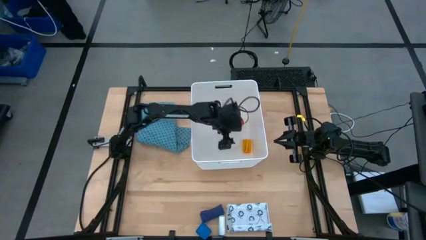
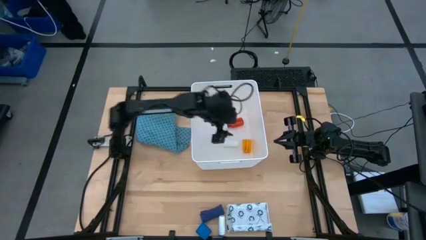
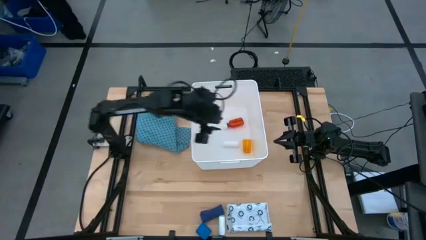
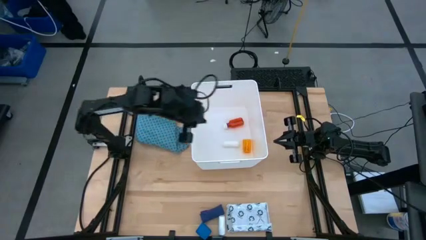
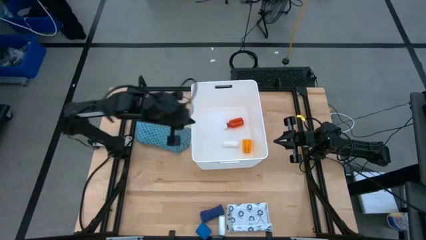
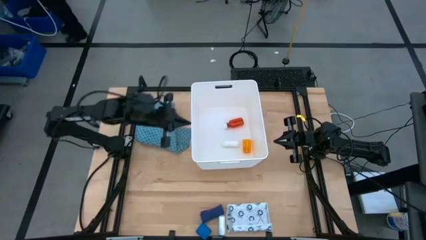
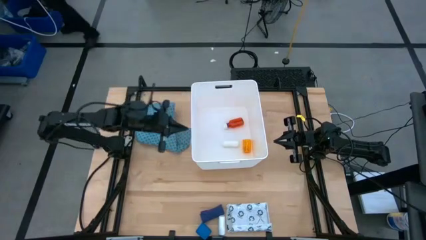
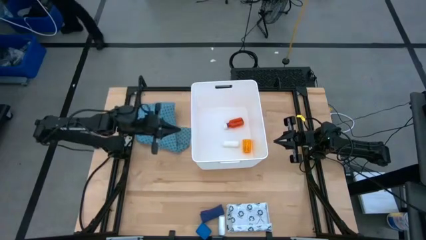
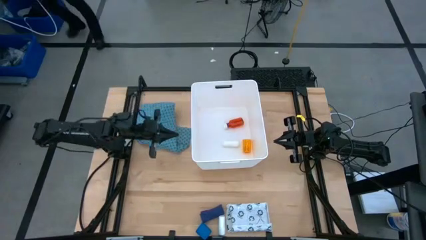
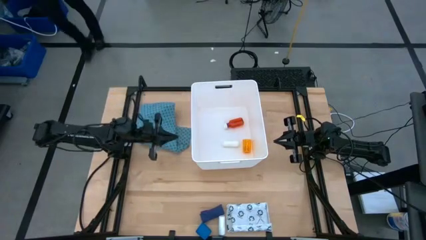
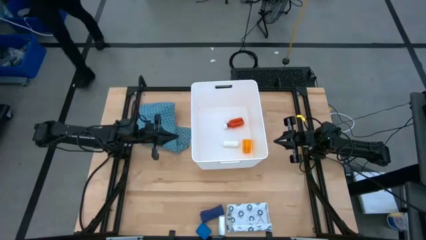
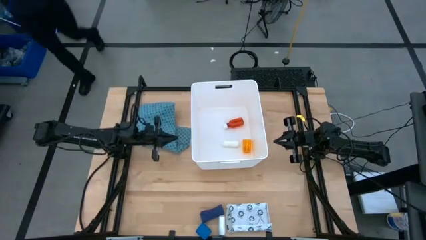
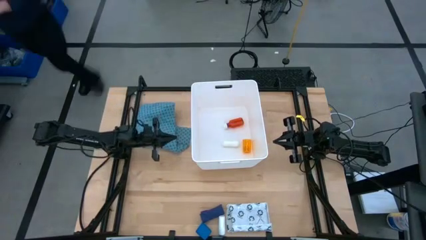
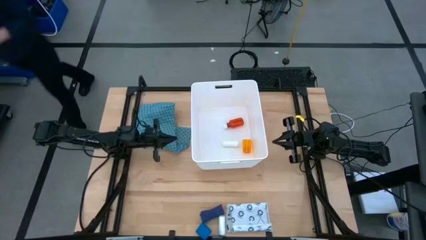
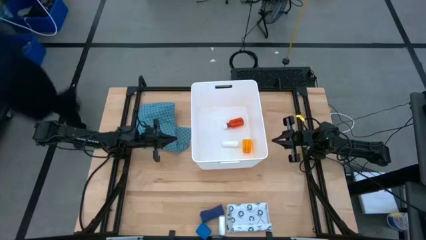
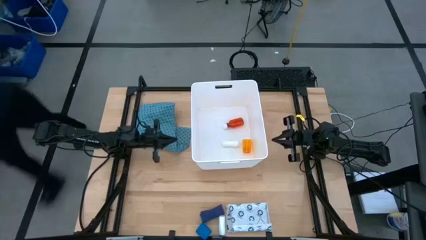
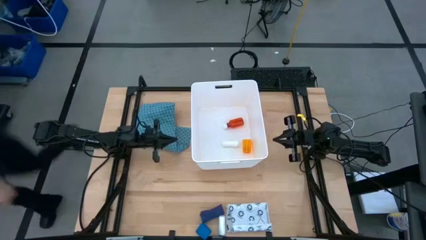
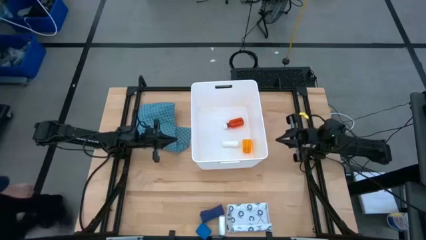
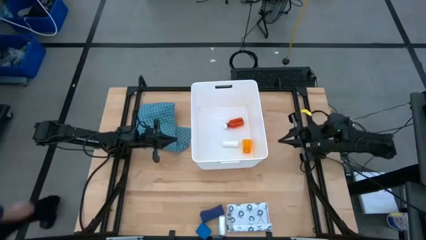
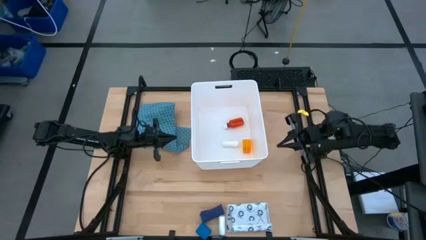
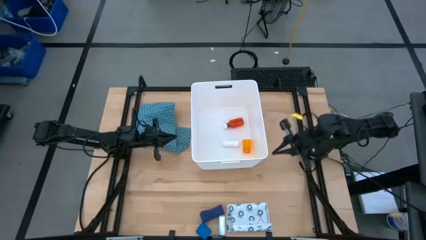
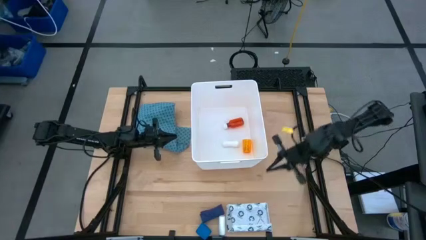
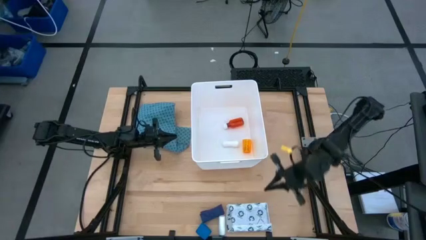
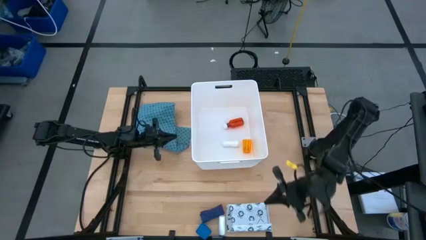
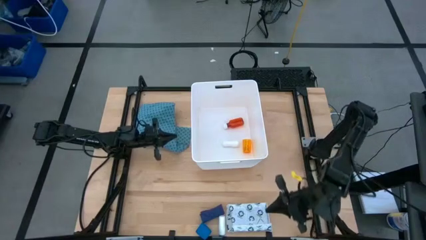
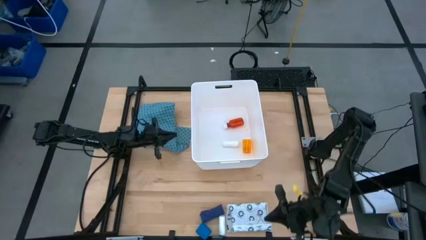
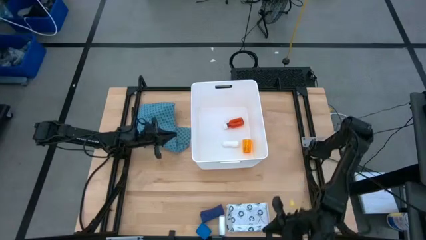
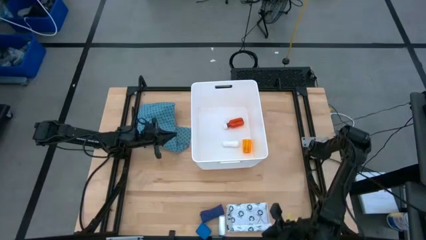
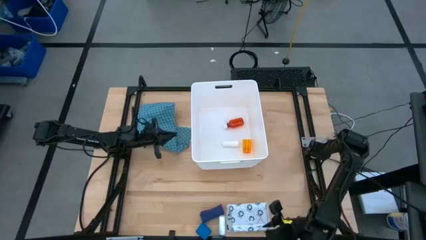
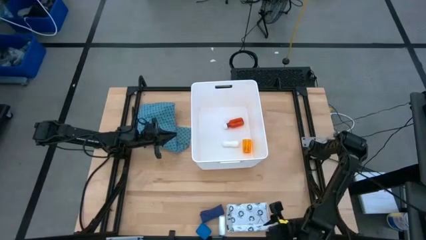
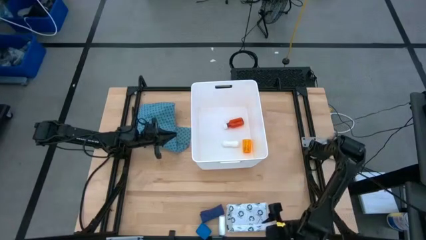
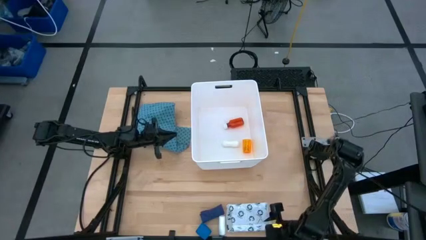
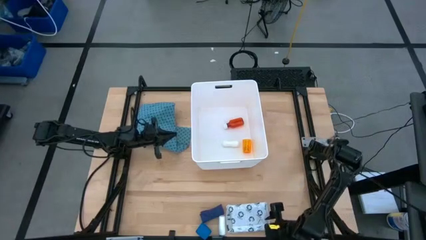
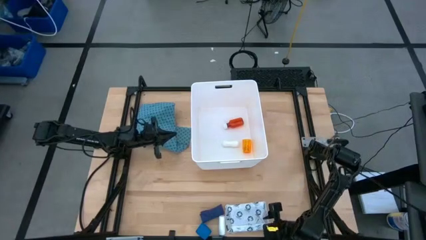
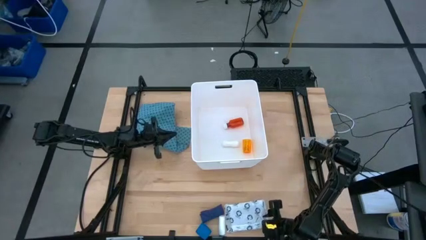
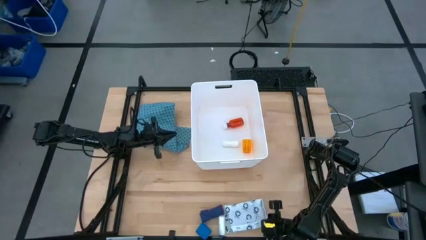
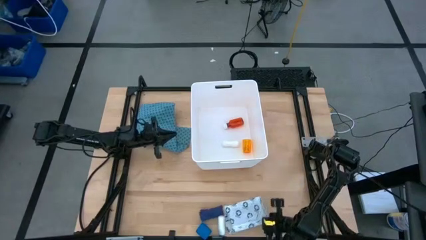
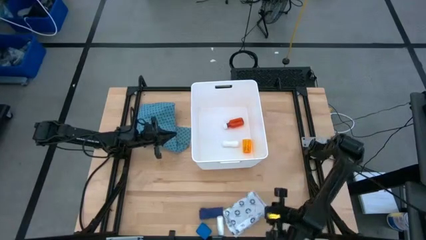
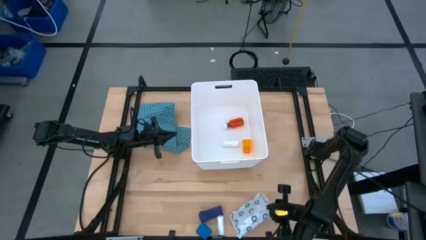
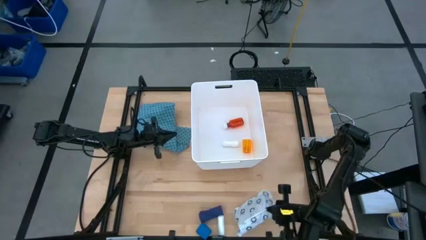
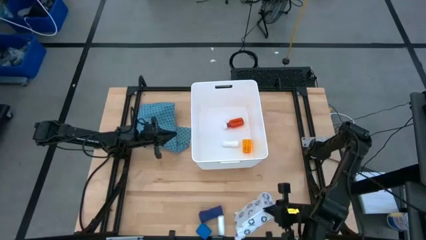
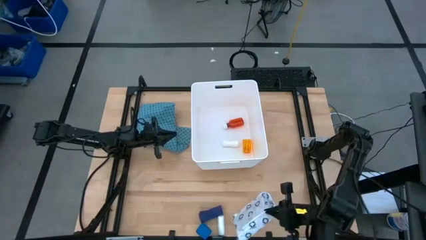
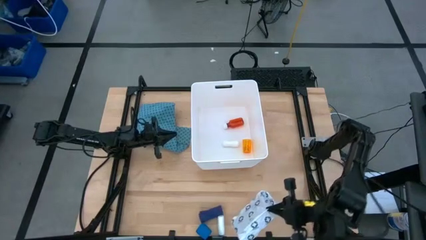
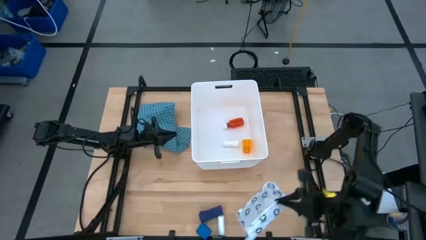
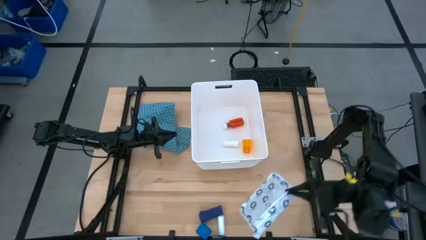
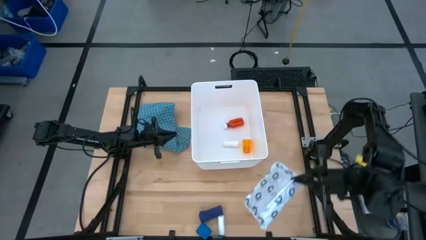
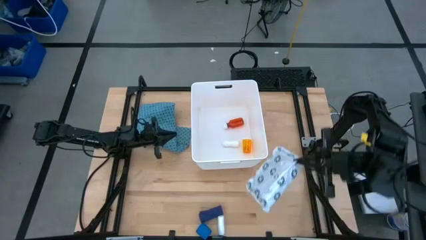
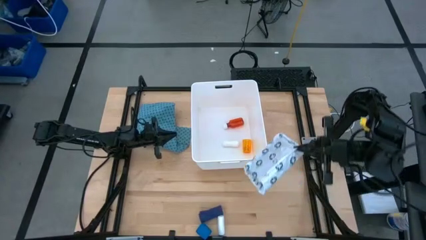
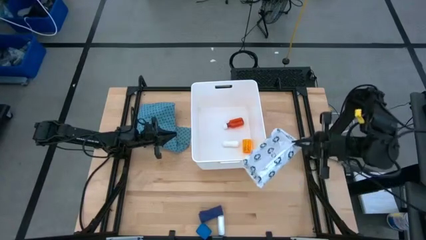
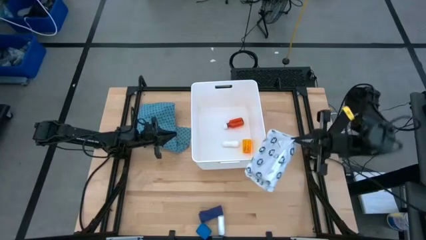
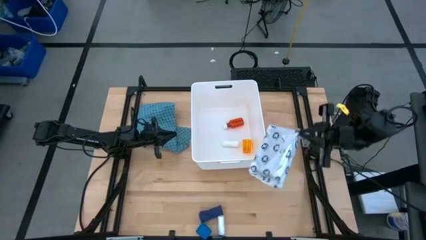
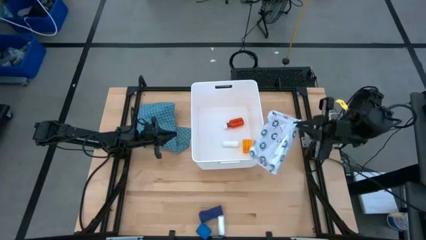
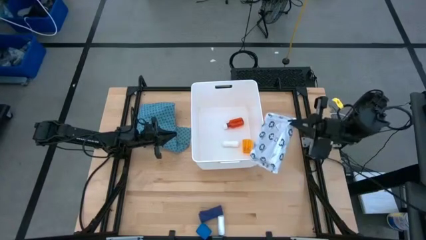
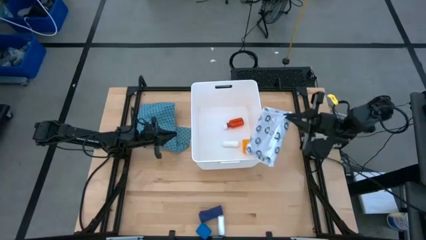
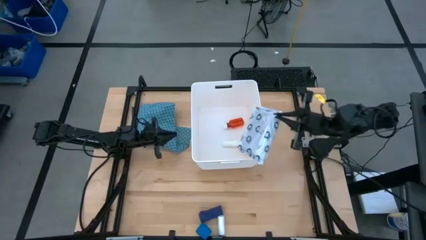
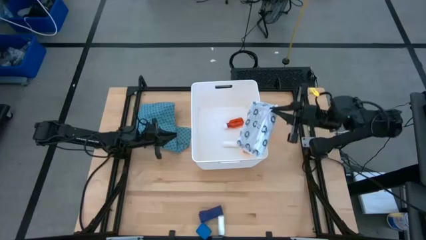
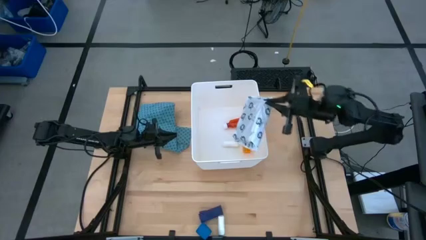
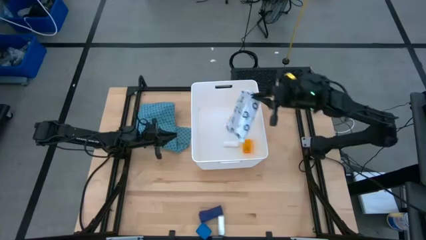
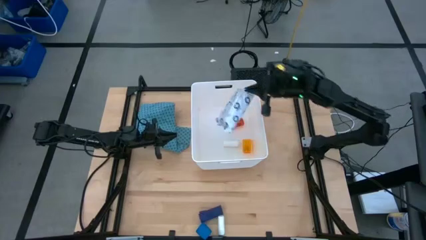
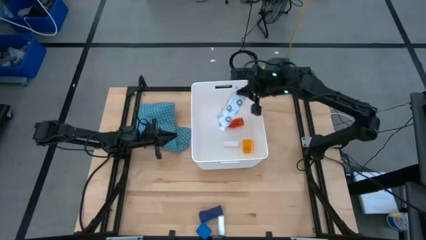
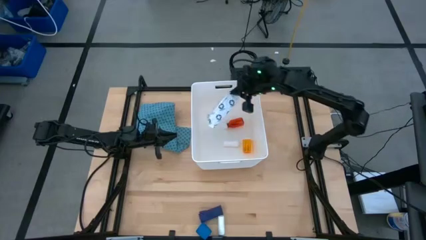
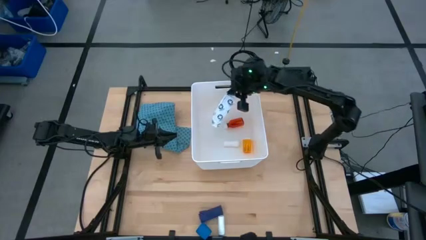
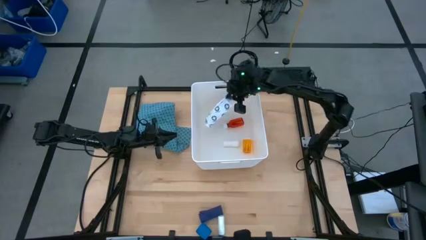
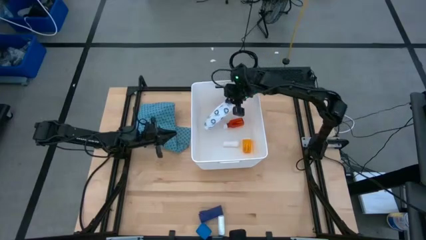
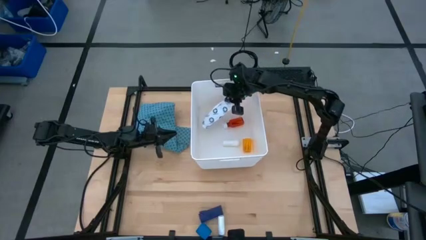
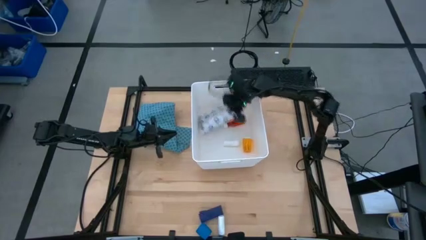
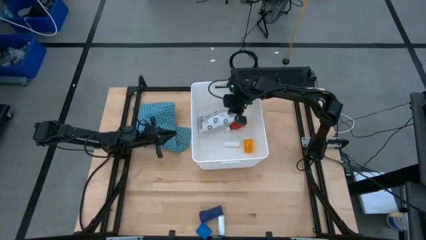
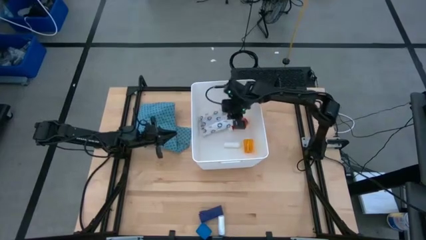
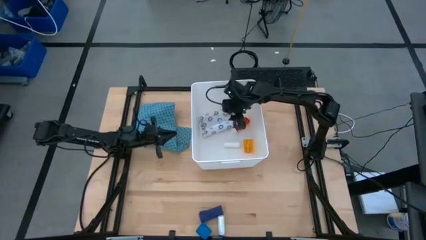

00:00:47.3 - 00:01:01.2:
Task: Pick & place medical supplies in basket/bin
Put the mailer bag into the white bin

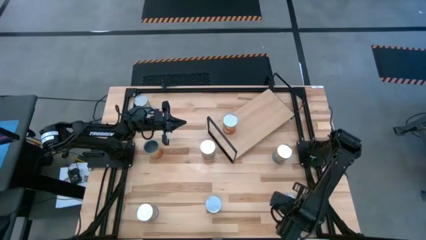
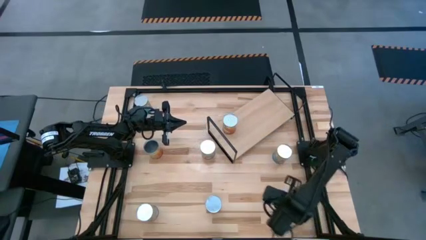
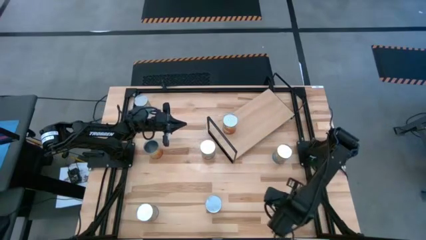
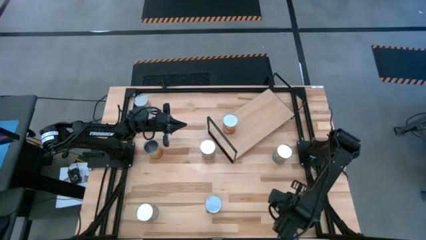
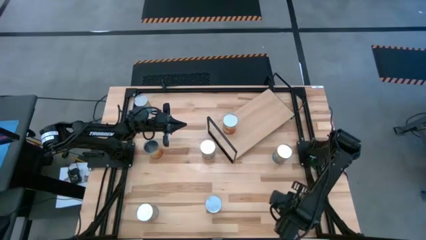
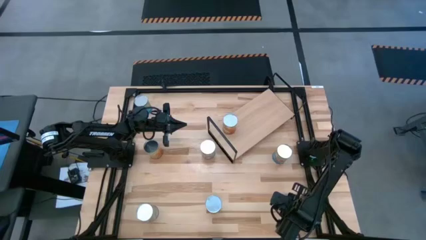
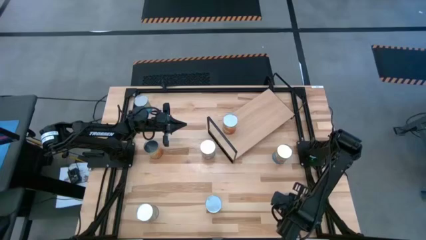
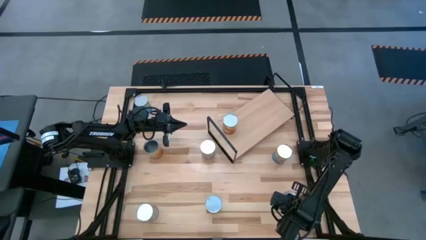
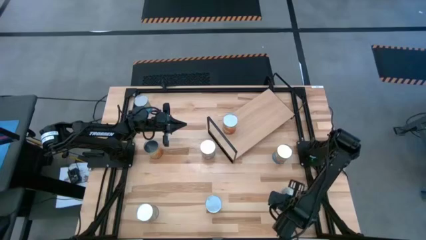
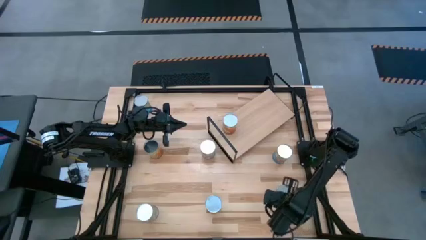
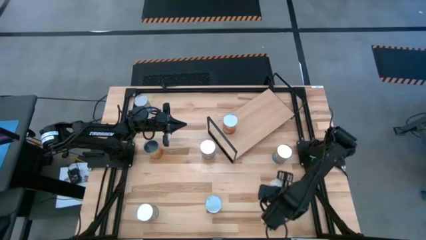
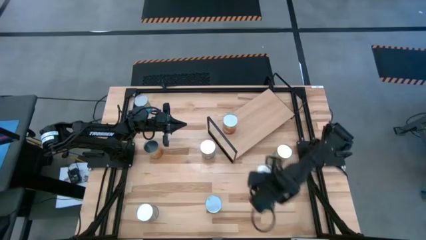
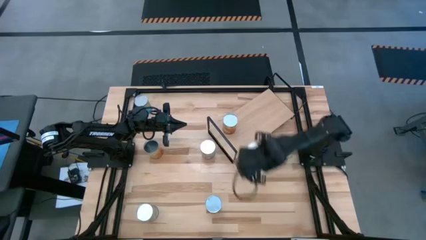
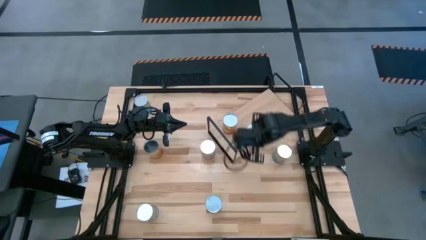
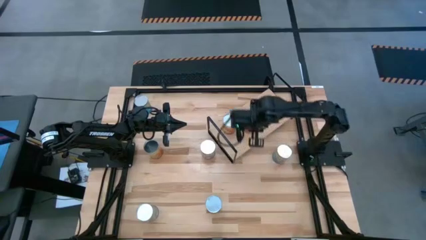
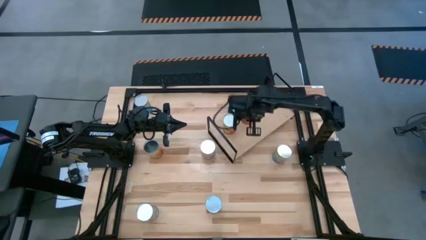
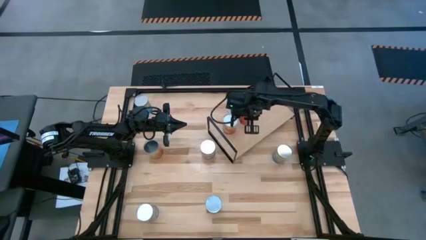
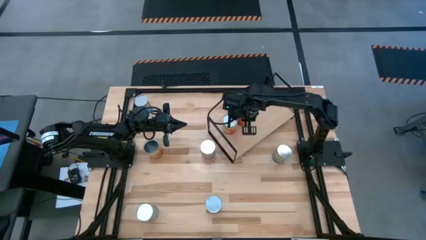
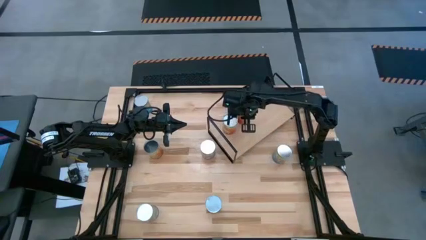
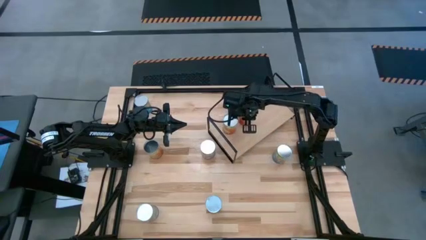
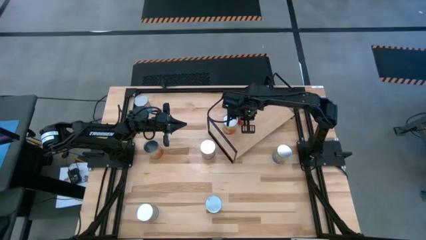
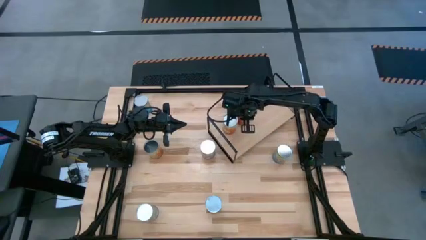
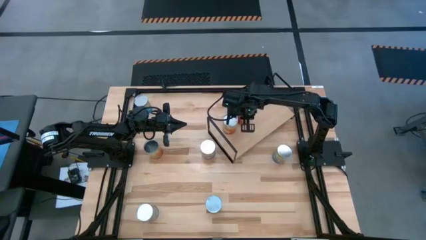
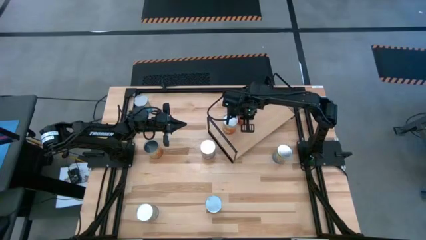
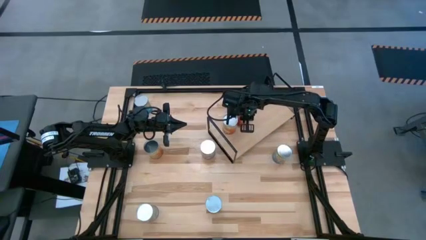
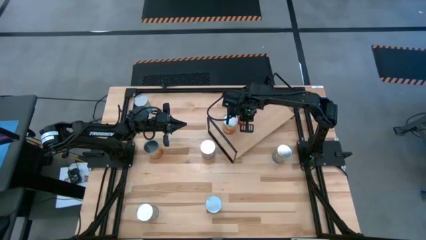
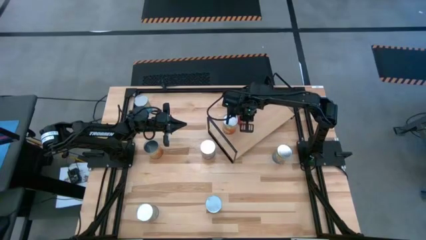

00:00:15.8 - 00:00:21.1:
Task: Pick and place cans onto a shelf
Put the bottom canned green beans on the shelf
